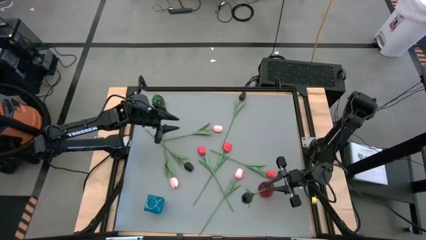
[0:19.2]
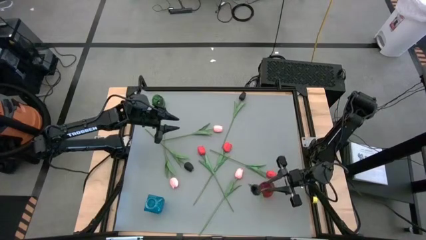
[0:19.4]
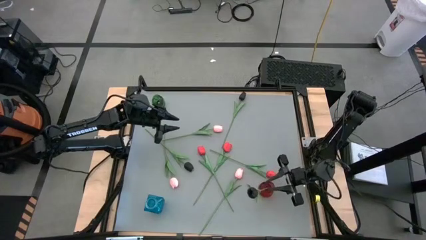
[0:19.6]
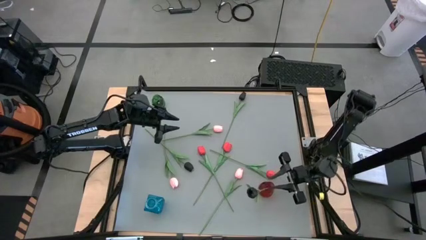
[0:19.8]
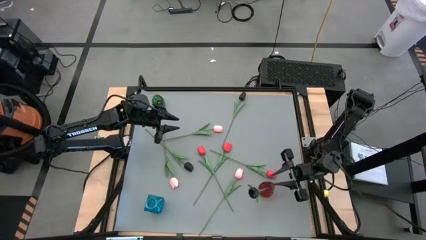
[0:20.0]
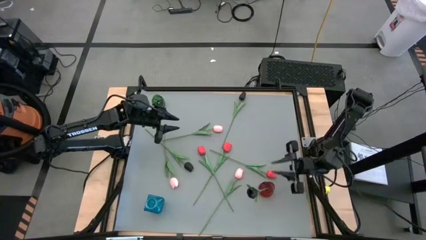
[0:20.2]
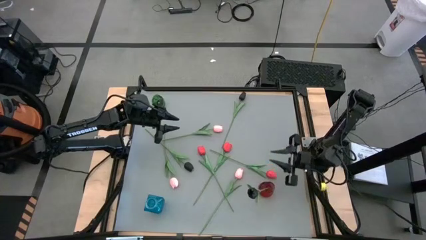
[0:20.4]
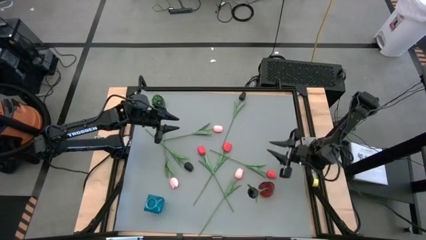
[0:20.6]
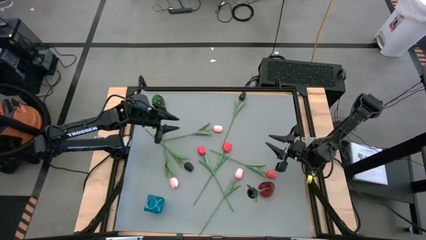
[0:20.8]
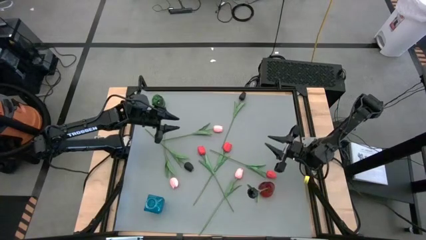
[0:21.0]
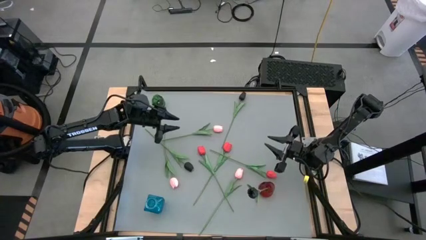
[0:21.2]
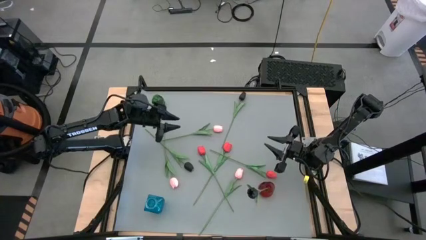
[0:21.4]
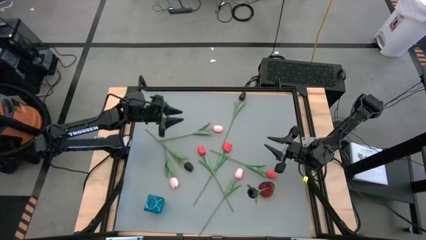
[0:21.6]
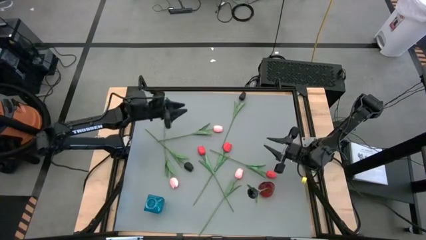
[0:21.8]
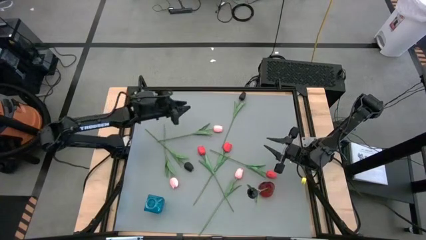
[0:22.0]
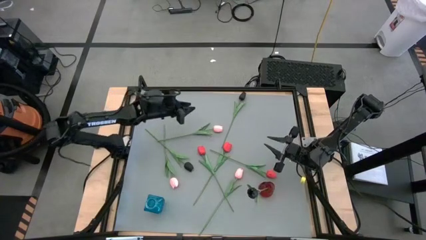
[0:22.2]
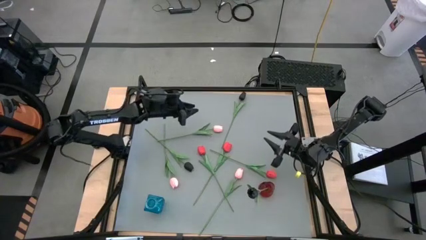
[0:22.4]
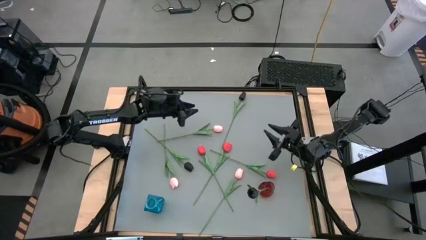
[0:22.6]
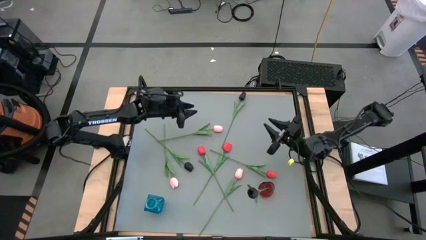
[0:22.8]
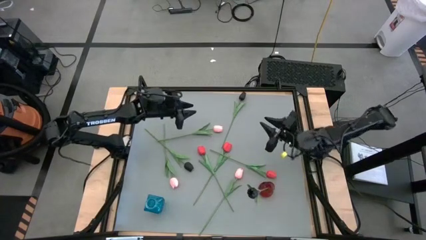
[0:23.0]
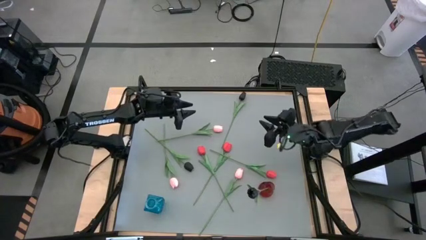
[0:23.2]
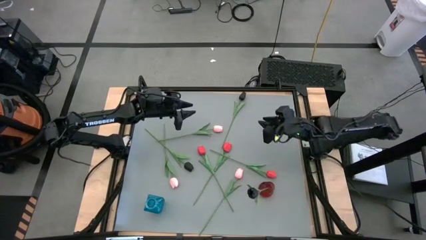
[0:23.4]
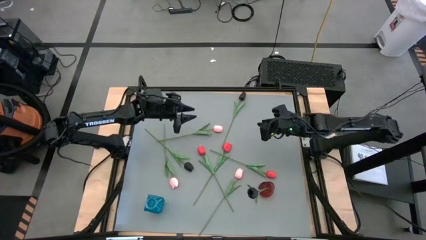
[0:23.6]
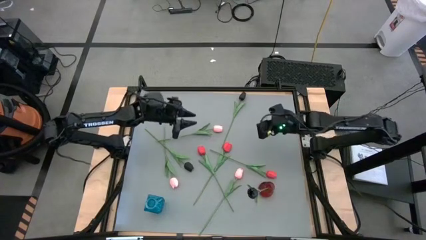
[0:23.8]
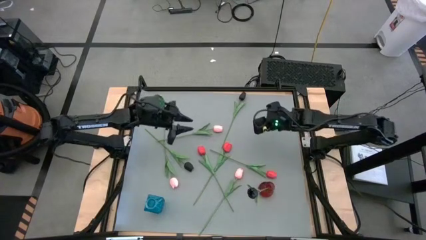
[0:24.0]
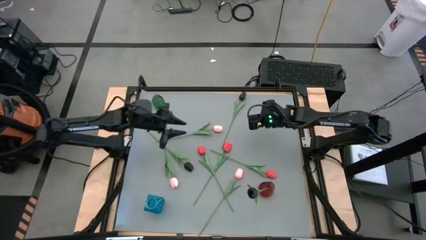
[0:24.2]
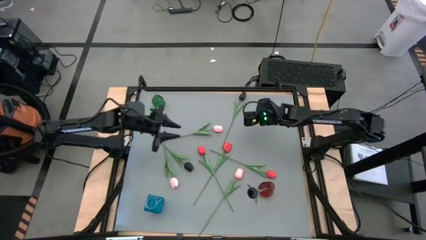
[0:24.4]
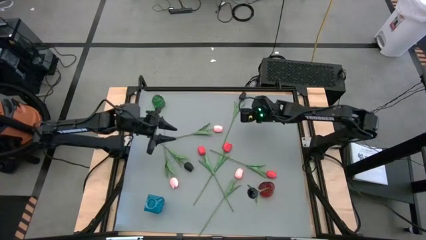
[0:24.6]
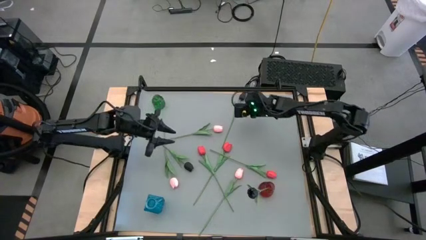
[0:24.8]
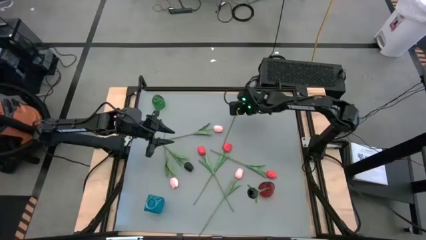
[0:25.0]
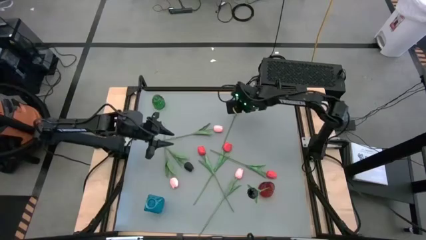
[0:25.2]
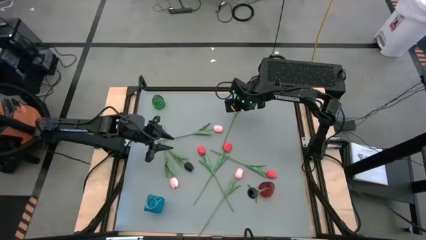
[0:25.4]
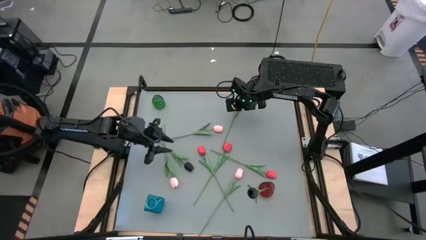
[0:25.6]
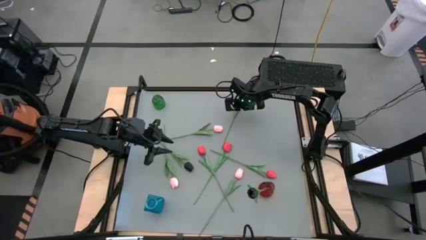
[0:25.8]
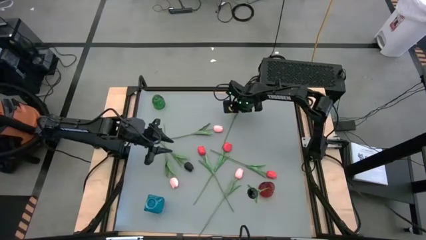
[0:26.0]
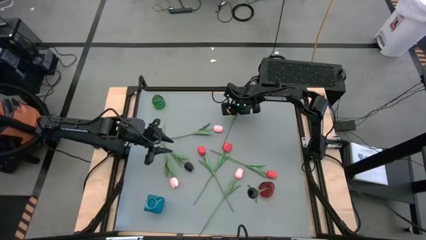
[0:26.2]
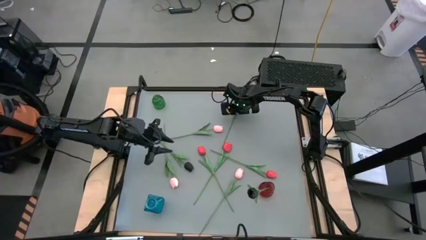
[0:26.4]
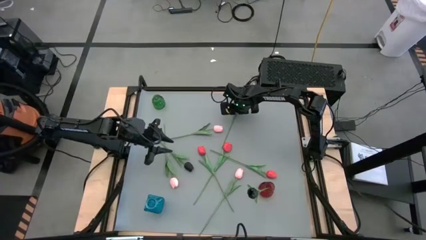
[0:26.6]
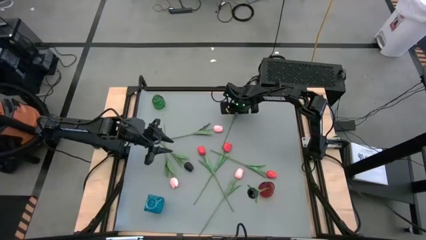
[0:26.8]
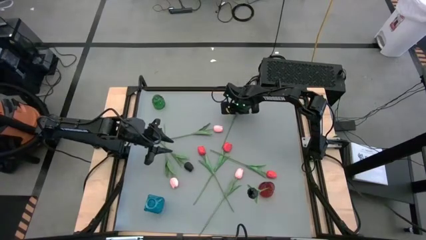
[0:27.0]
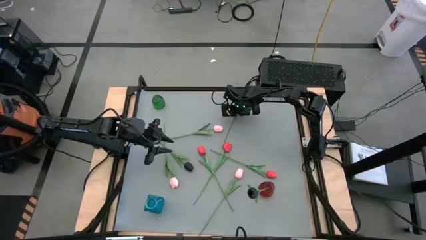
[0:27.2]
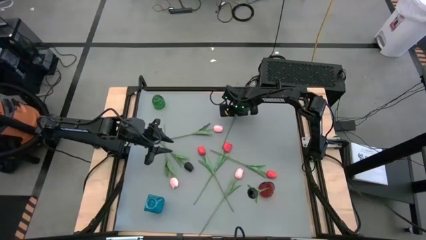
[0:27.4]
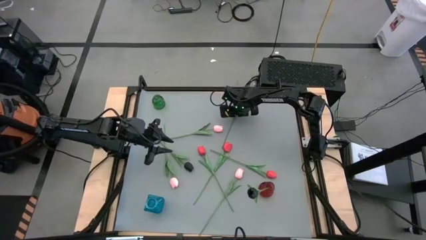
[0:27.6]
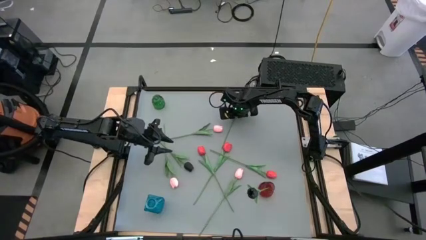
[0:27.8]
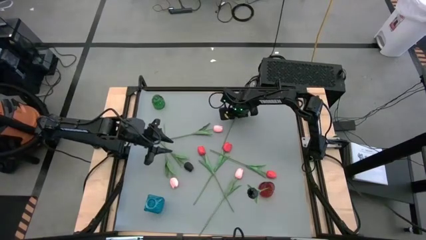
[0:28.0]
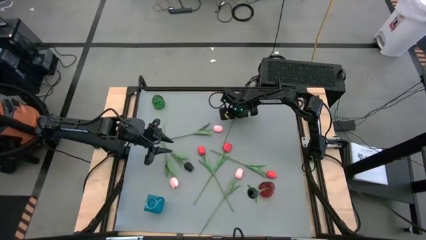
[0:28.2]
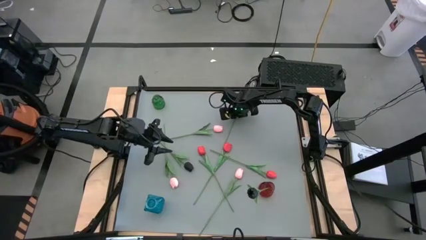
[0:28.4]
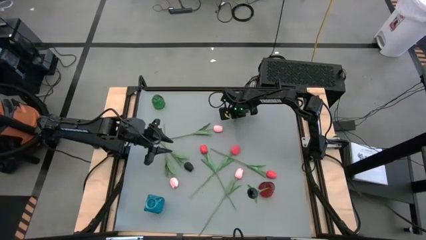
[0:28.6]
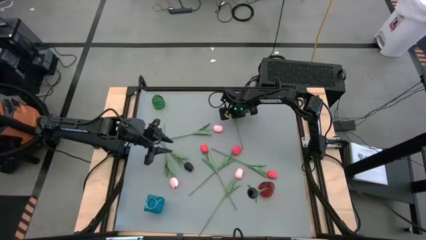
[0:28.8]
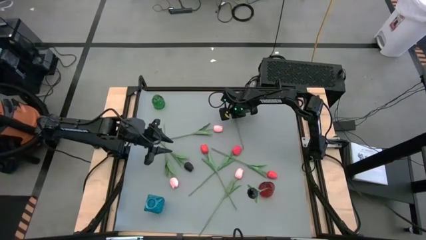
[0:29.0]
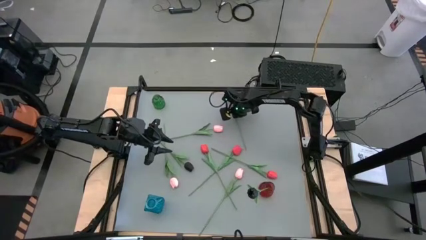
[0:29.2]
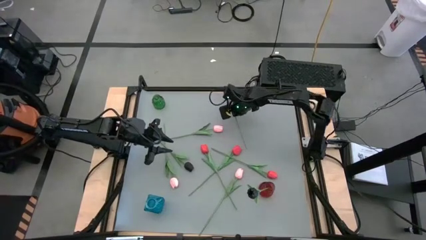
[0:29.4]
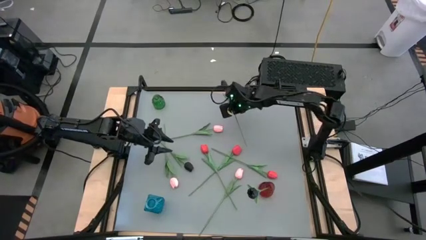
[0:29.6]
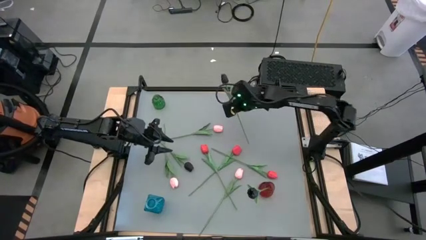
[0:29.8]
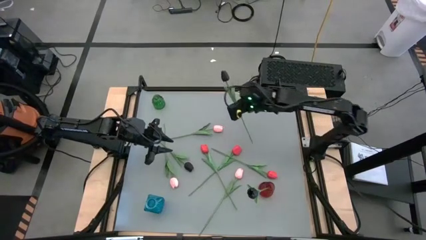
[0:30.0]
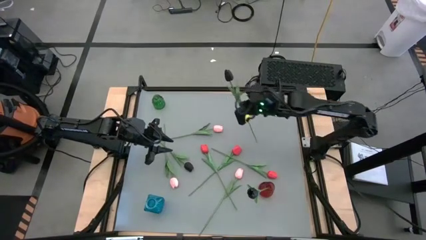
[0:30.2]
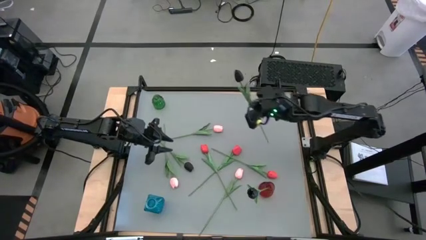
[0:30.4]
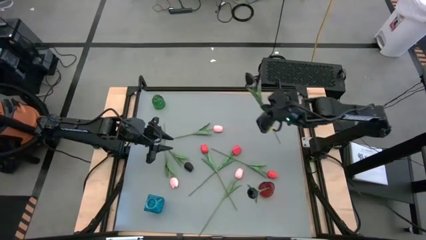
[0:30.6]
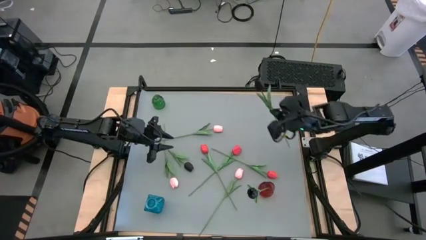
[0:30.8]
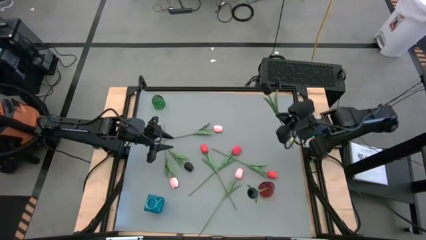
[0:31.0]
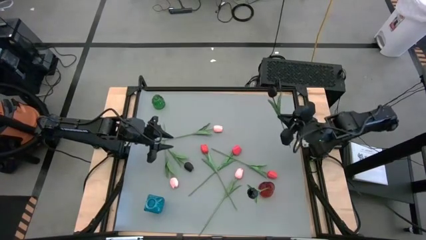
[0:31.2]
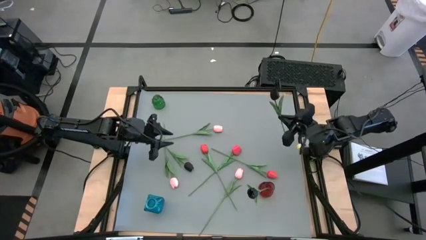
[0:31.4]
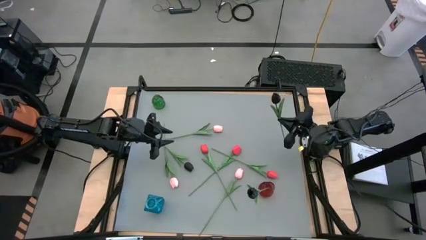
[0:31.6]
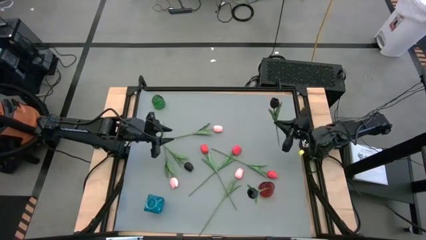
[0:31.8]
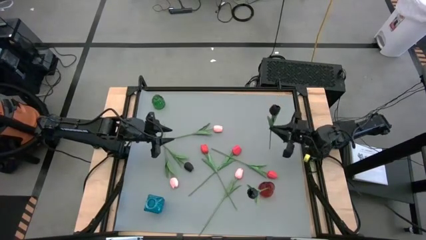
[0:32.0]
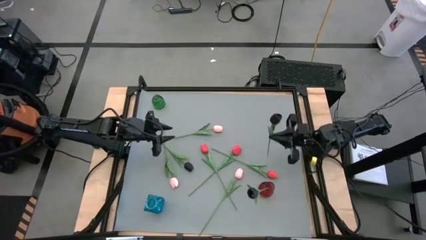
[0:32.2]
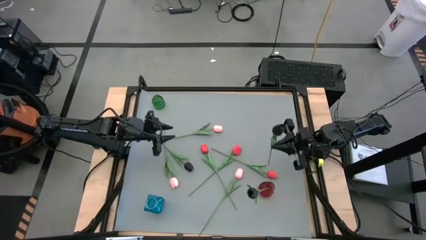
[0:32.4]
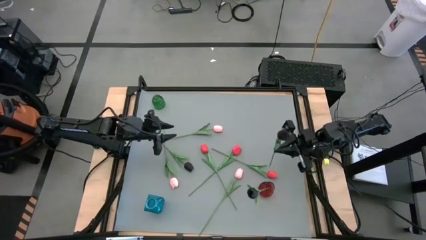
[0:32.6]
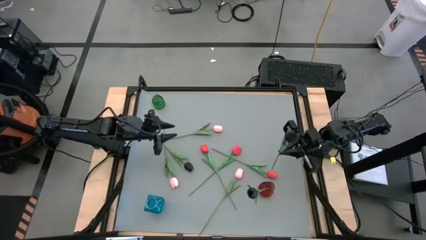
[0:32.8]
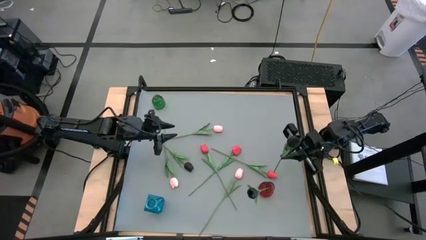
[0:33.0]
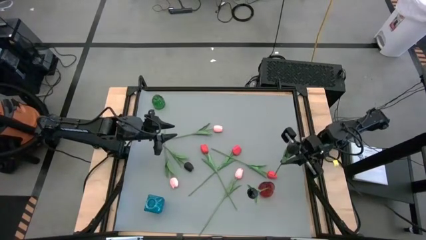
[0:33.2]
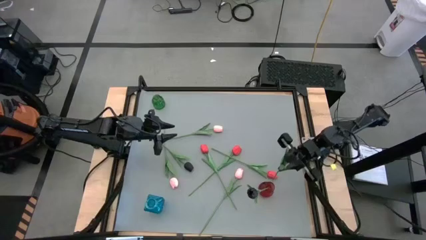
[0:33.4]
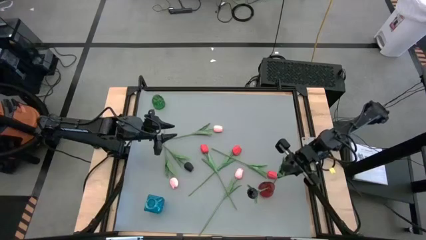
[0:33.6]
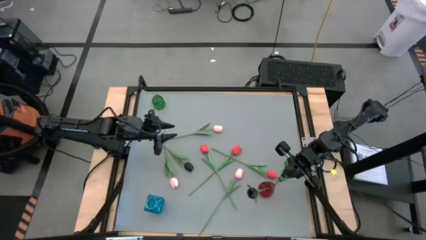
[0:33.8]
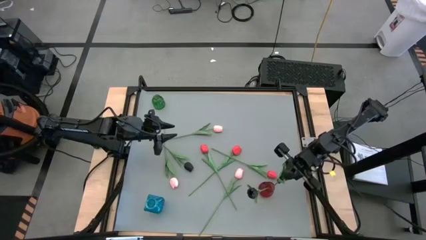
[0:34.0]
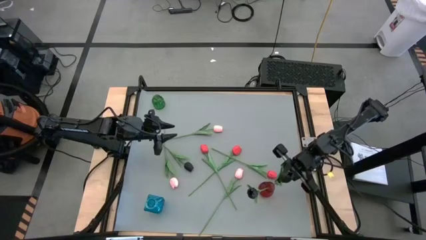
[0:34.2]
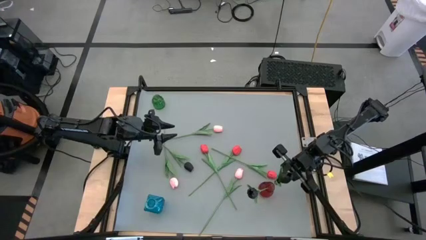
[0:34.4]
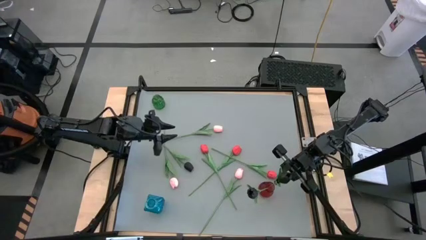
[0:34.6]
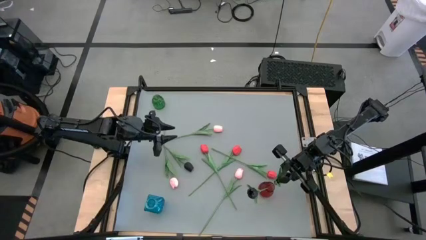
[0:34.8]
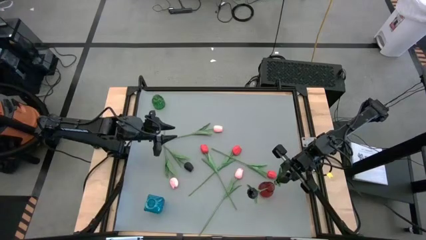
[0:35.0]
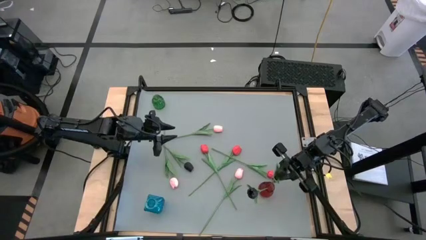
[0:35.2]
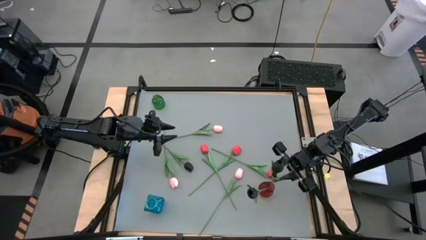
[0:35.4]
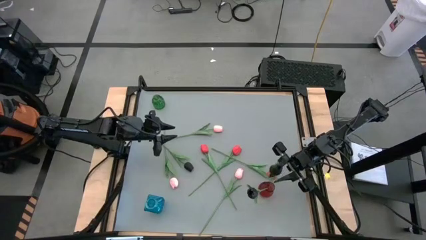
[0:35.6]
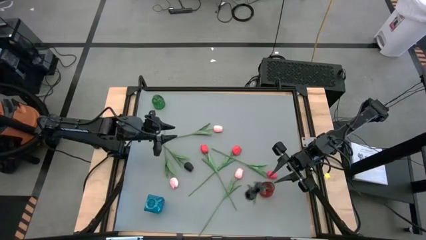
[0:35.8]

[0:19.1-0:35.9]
Task: Sort flowers into vase by color
Put the top black flower into the red vase
